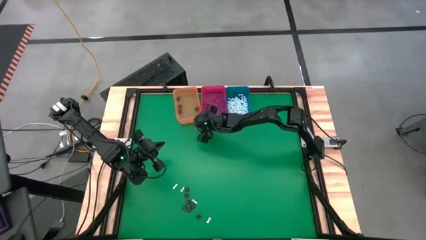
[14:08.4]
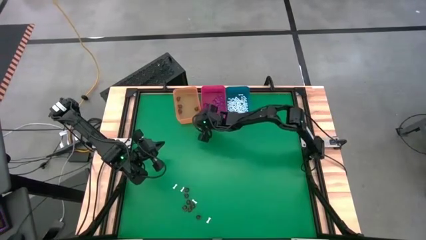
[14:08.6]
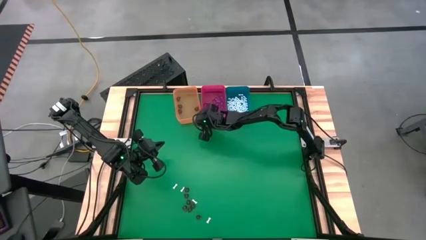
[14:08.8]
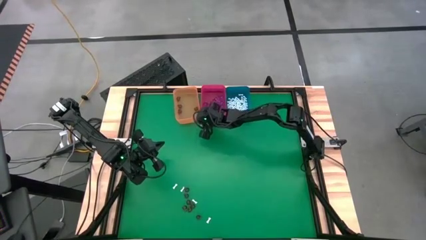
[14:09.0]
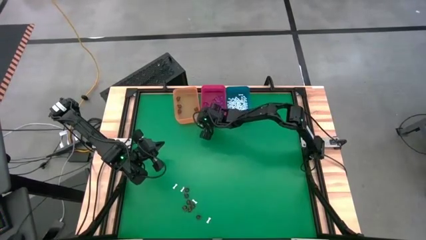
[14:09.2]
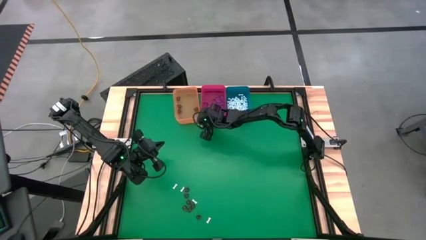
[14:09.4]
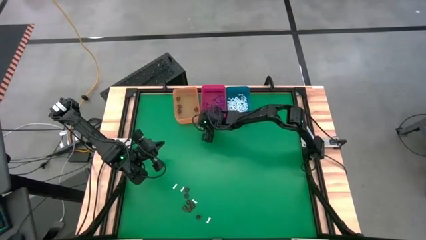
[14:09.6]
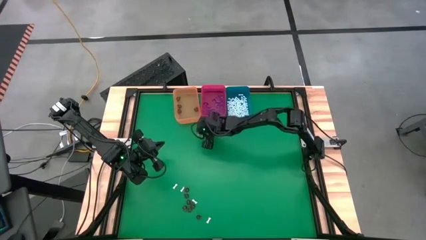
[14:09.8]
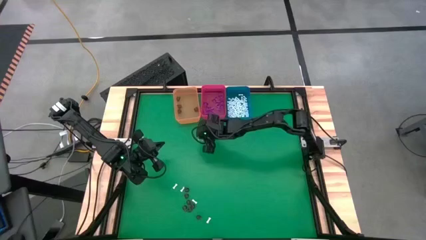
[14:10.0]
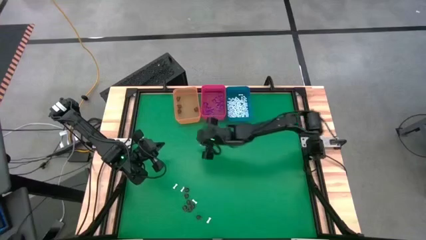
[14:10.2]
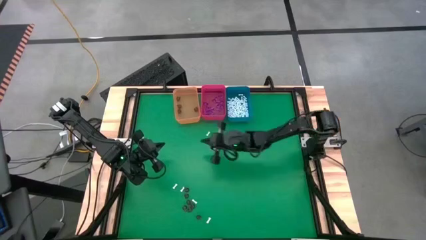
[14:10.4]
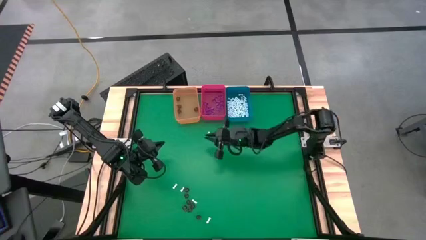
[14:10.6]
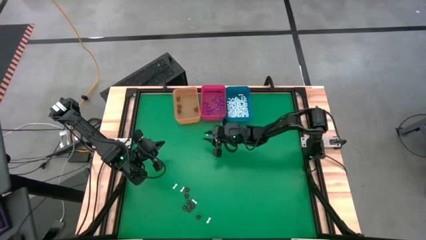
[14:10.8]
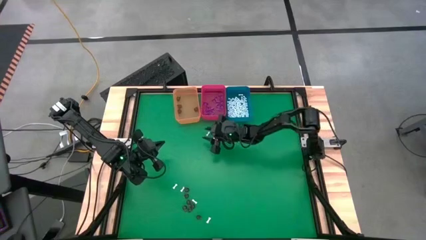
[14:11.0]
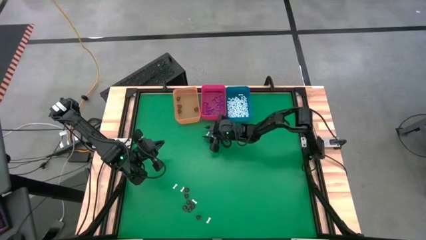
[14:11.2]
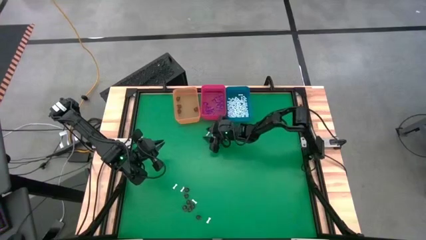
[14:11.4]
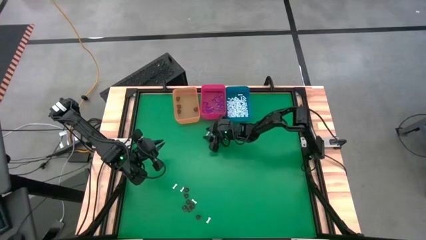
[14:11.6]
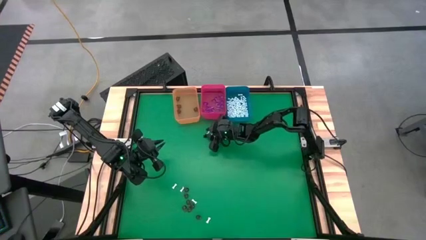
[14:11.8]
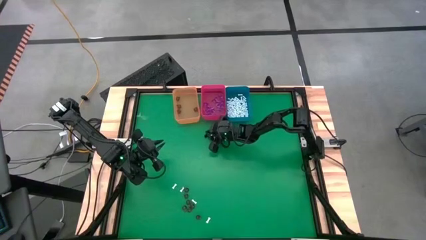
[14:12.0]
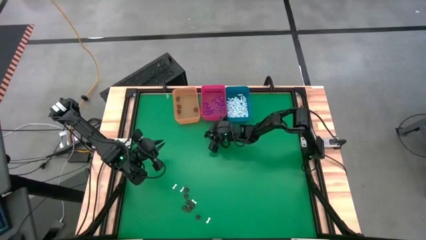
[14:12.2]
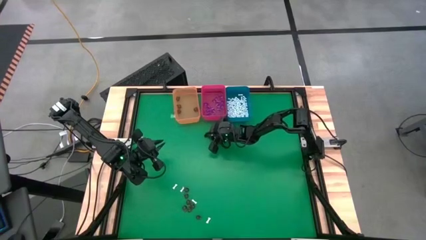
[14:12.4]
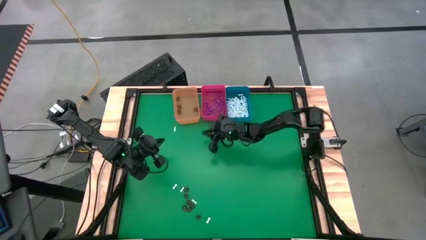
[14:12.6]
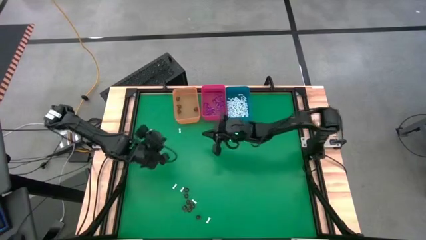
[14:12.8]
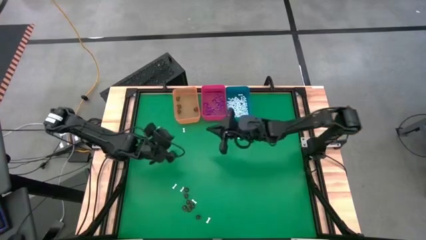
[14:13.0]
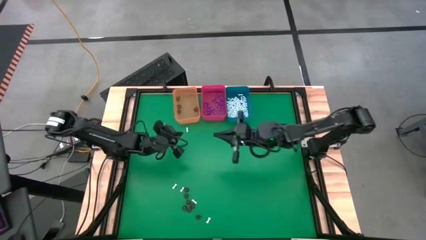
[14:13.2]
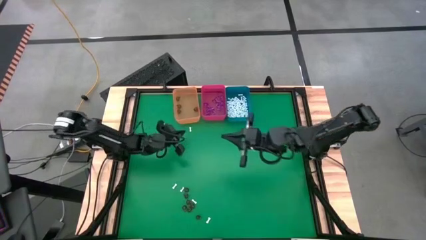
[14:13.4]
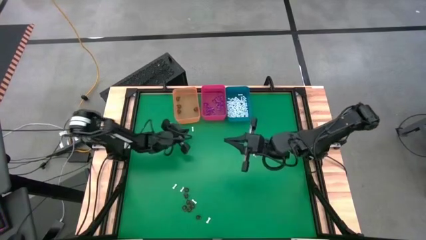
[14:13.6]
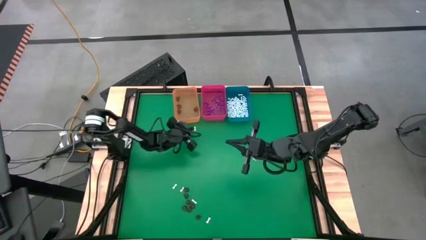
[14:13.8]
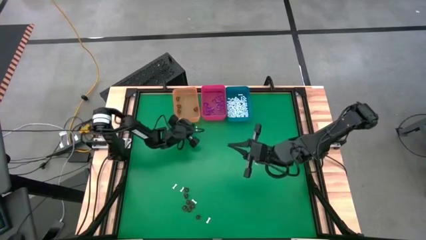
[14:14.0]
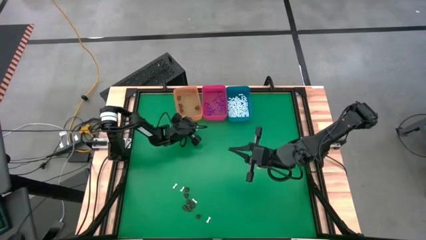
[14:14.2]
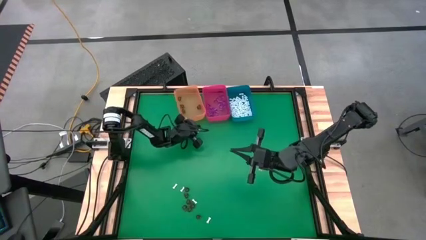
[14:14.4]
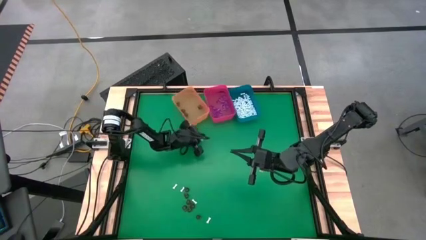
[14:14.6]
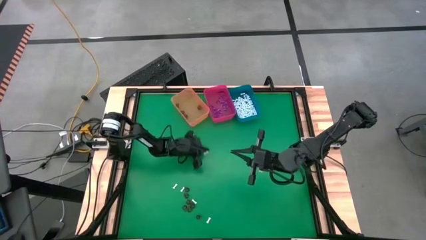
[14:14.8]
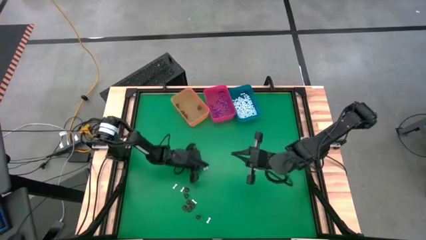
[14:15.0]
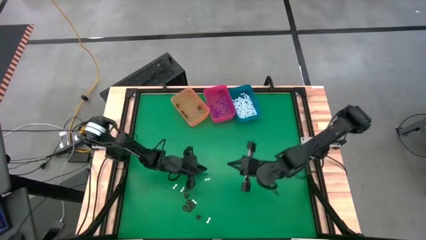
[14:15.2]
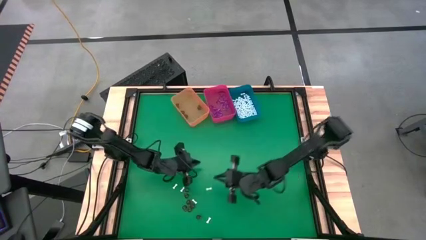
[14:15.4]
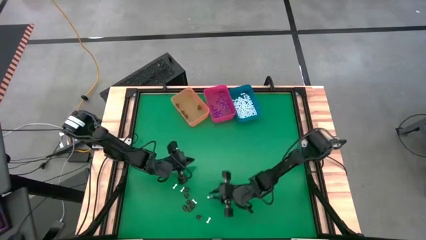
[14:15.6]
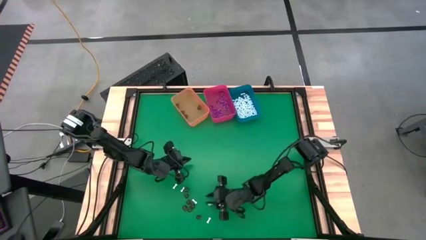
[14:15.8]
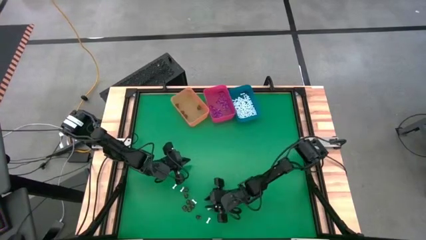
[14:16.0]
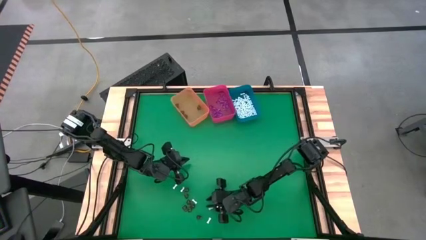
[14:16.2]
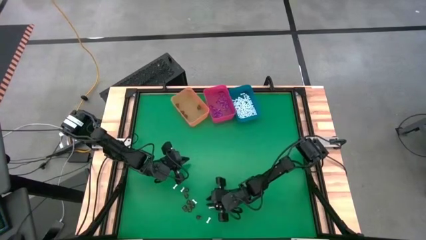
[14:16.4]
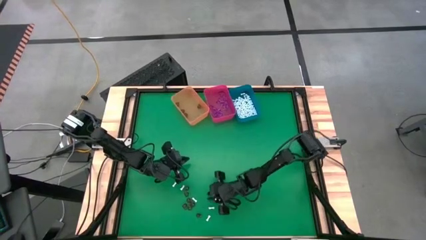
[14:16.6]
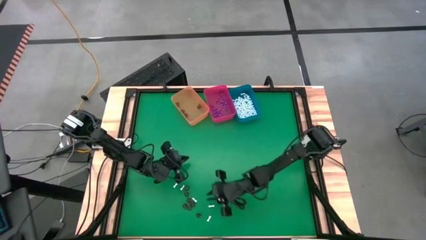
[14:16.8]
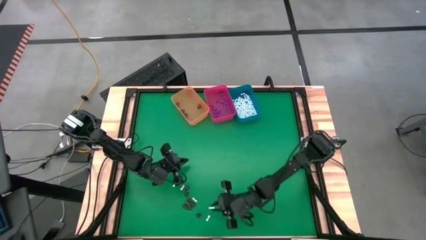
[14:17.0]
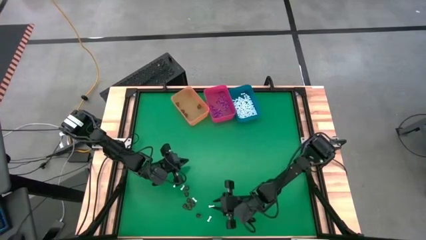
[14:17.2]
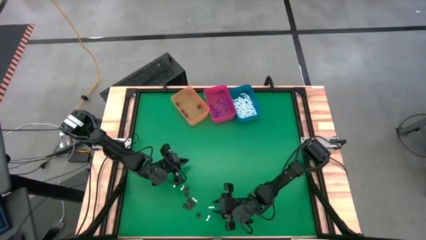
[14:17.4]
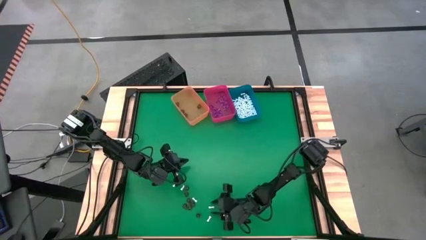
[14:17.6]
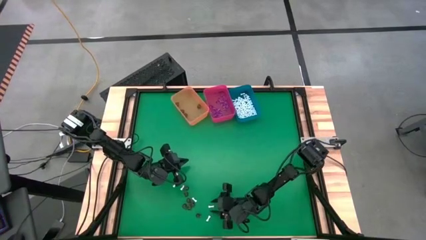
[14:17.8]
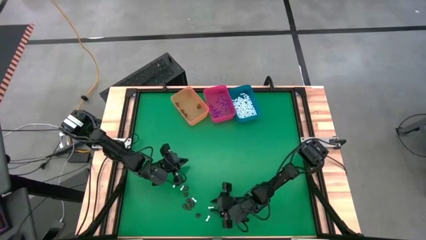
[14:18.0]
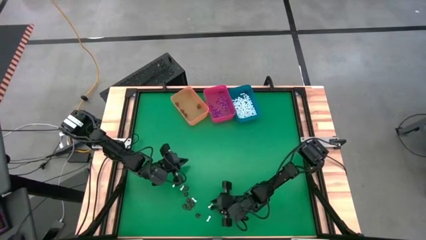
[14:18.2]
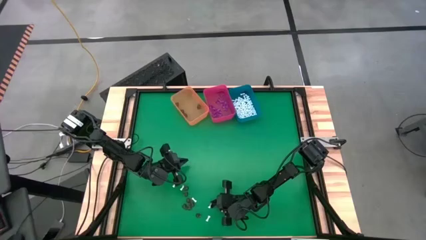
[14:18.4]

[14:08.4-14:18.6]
Task: Sort Halloween decoration
Put the white bone toy into the blue bin

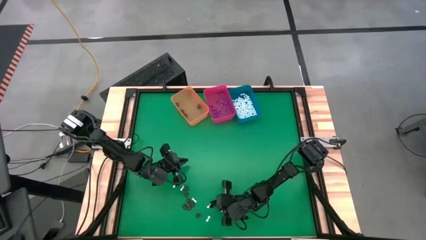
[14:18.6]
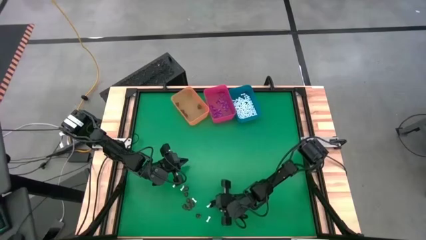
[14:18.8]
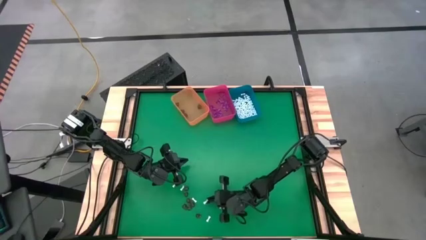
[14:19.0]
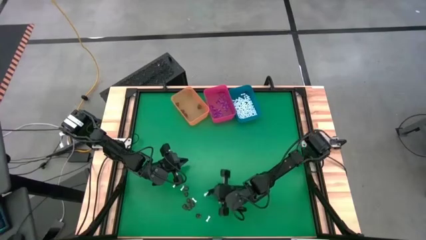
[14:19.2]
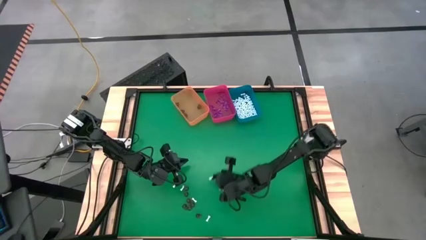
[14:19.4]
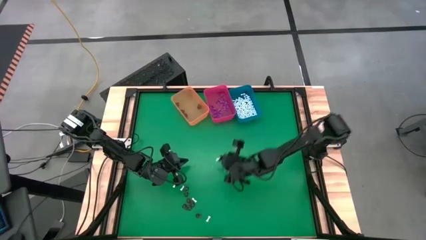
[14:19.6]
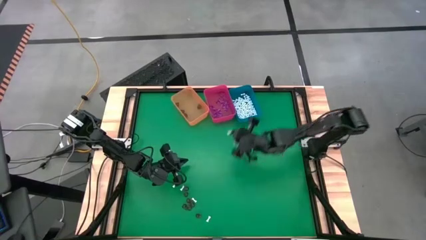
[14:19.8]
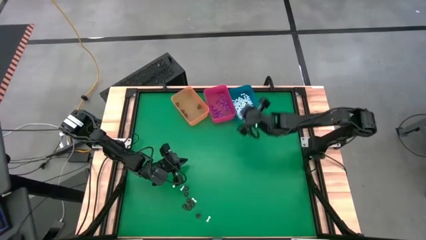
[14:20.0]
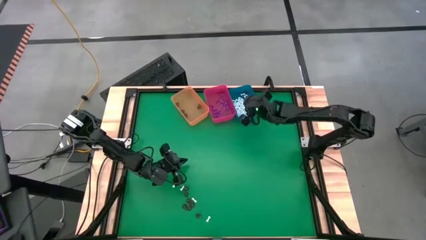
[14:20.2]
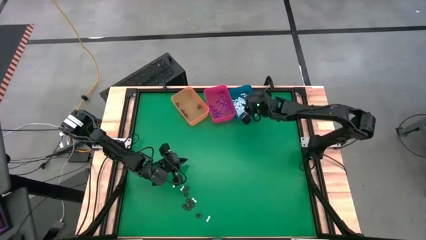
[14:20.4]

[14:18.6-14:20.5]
Put the white bone toy into the blue bin

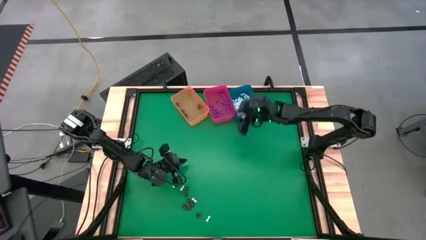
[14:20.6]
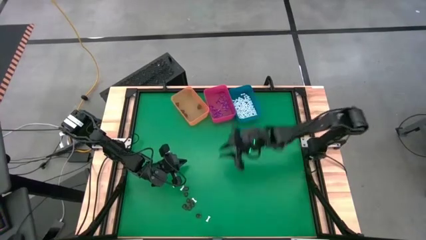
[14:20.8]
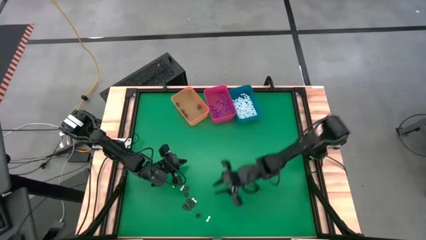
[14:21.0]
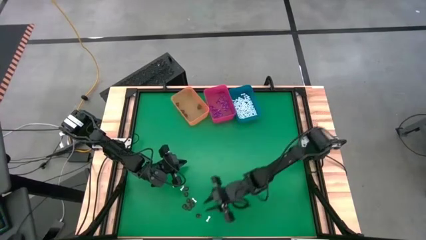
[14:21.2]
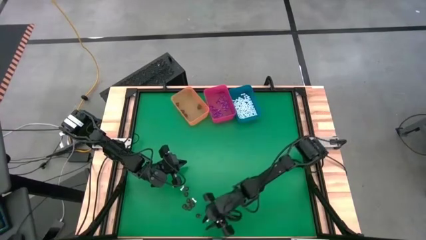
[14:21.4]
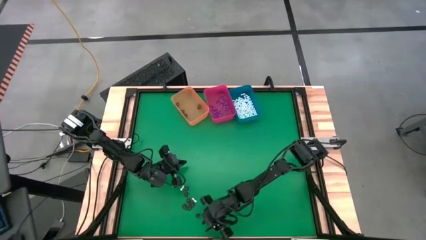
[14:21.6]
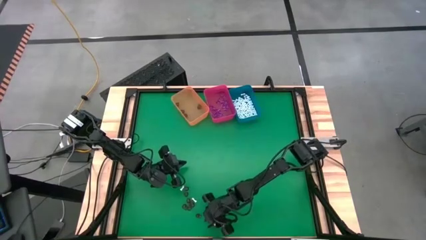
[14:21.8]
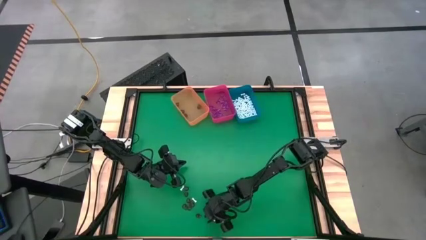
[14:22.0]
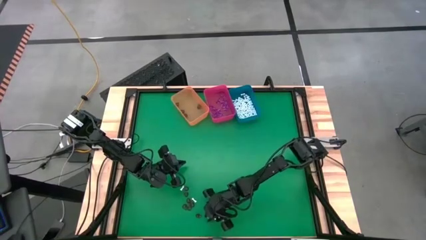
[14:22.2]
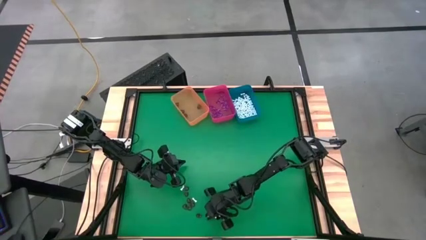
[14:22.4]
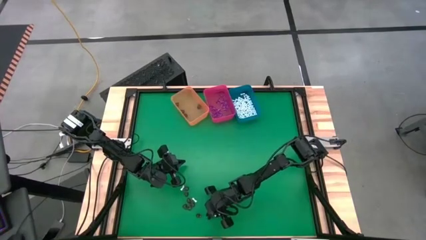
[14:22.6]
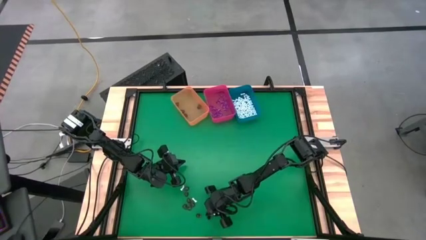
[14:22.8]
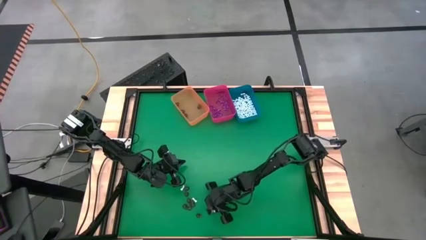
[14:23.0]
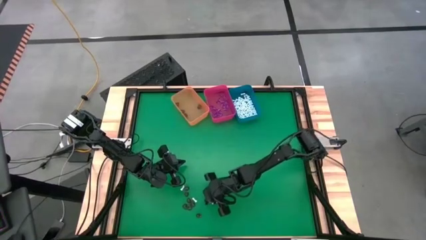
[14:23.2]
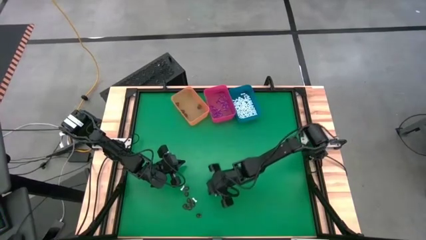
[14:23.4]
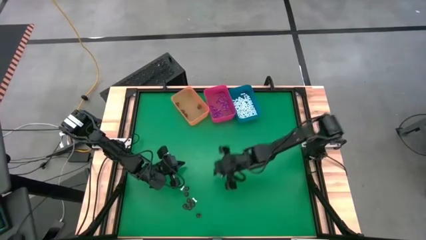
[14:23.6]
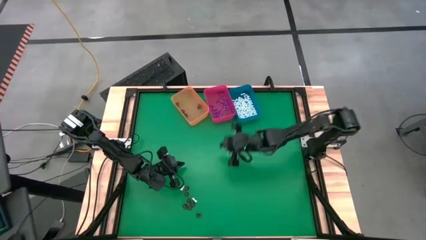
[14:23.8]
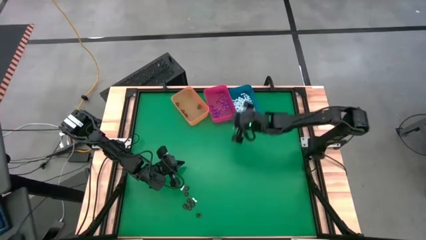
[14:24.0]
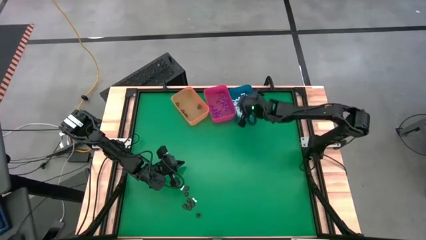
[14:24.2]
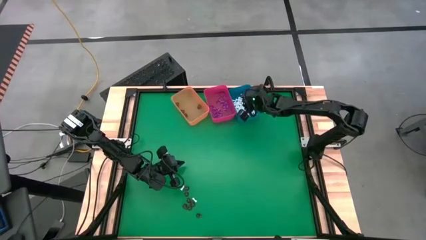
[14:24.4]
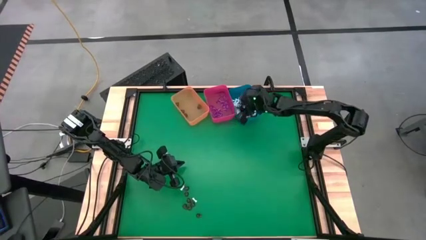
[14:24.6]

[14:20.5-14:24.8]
Put the white bone toy into the blue bin

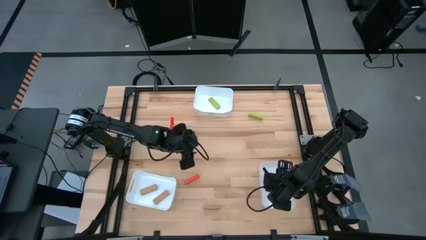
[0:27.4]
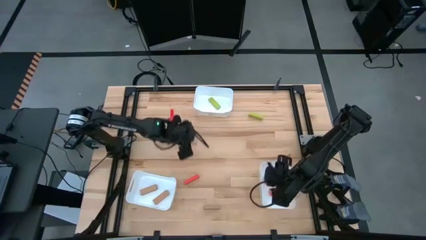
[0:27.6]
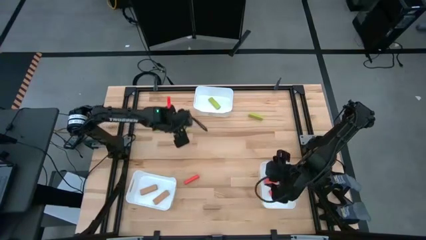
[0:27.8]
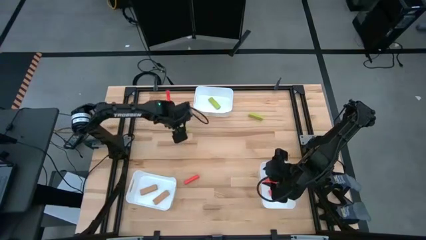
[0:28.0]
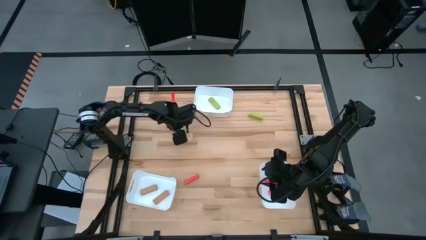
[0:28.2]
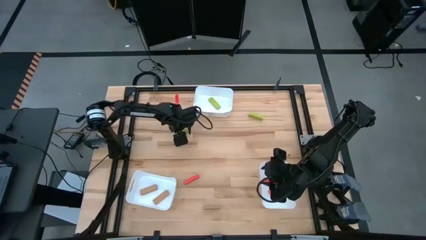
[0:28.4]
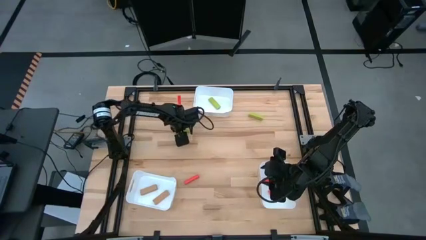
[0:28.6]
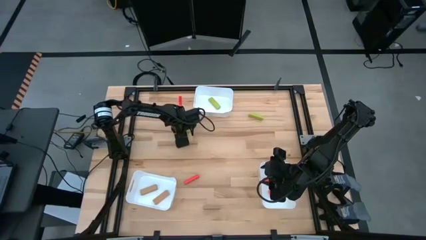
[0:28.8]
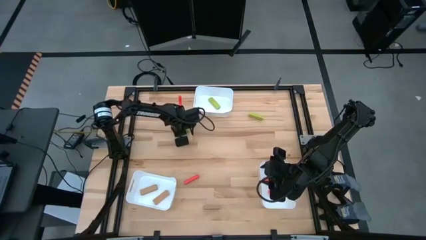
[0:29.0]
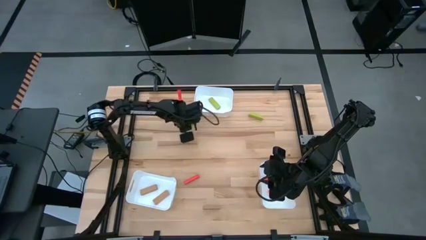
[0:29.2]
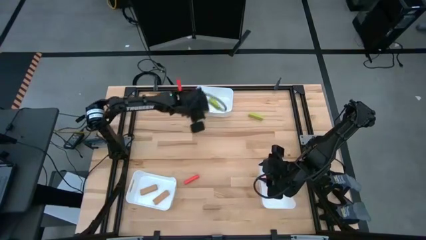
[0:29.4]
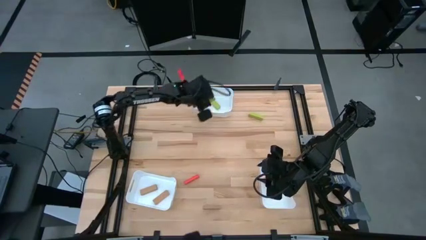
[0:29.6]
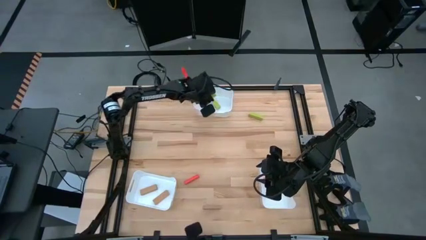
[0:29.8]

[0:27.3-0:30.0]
Task: Sort blocks
Put the left green block into the top center white bin
